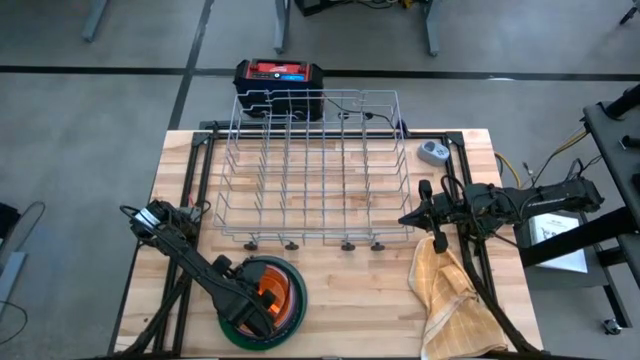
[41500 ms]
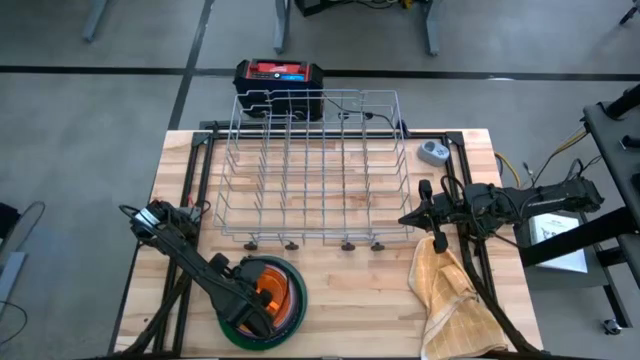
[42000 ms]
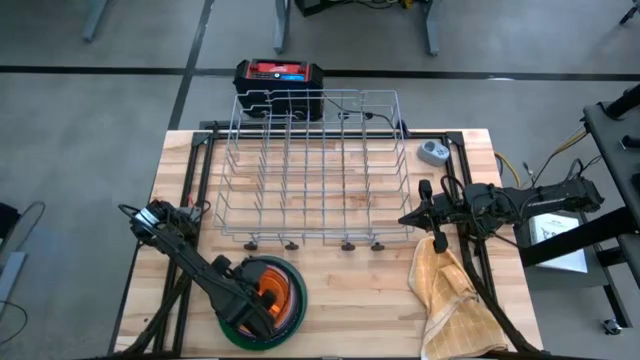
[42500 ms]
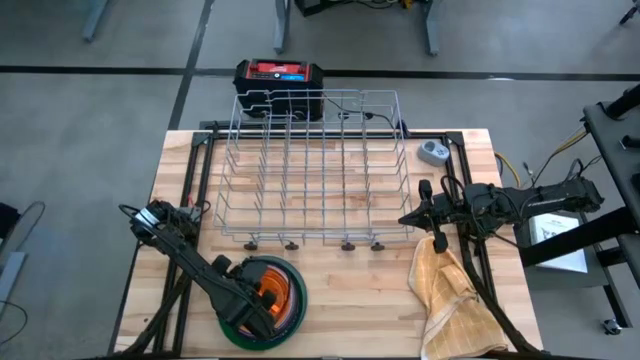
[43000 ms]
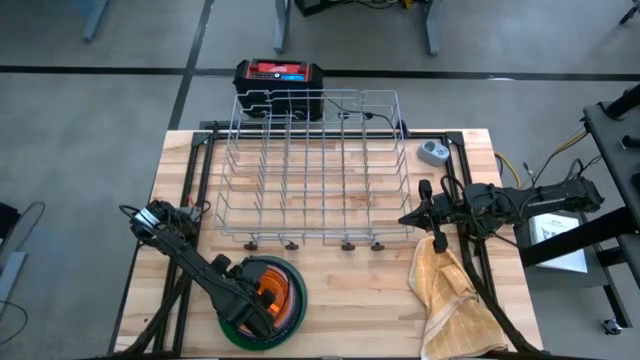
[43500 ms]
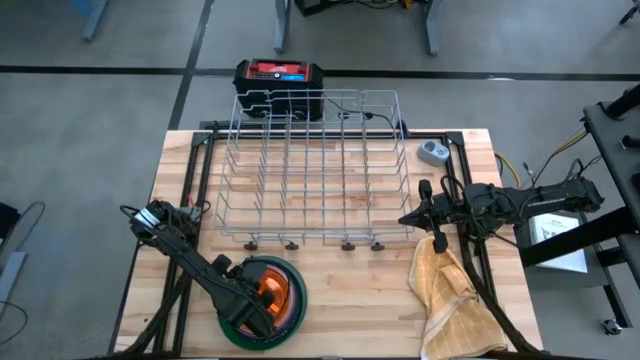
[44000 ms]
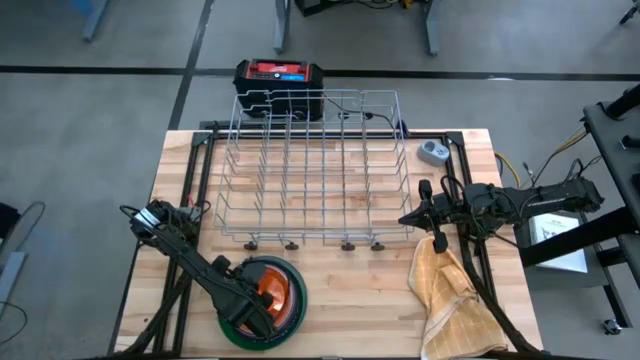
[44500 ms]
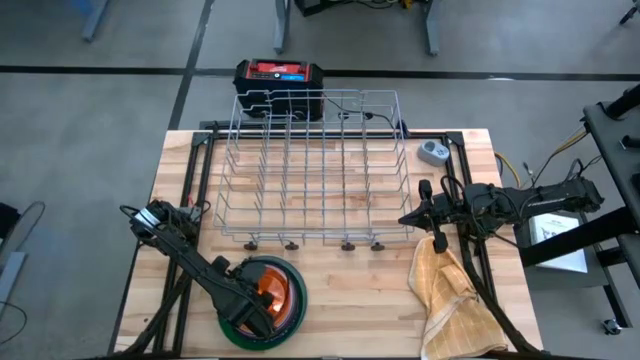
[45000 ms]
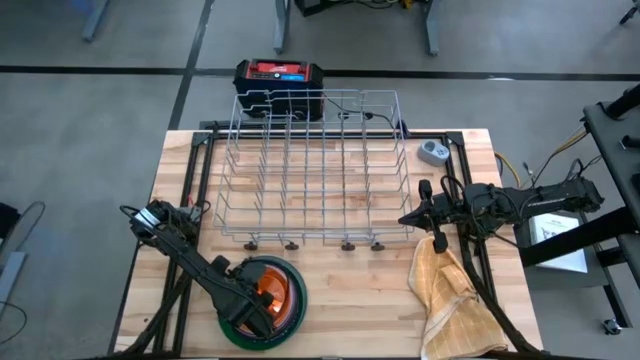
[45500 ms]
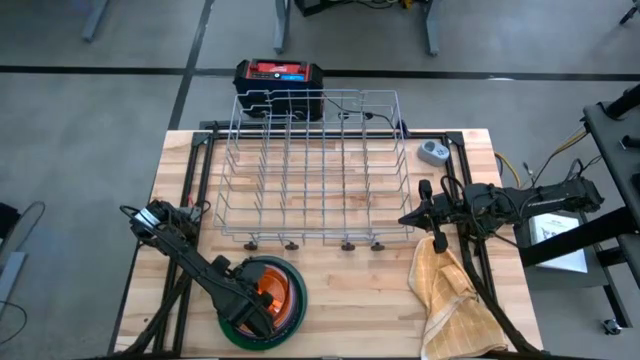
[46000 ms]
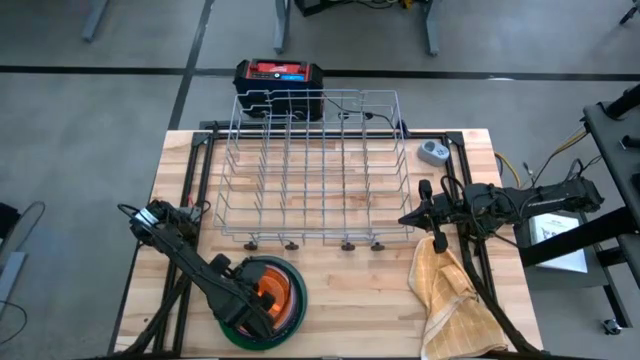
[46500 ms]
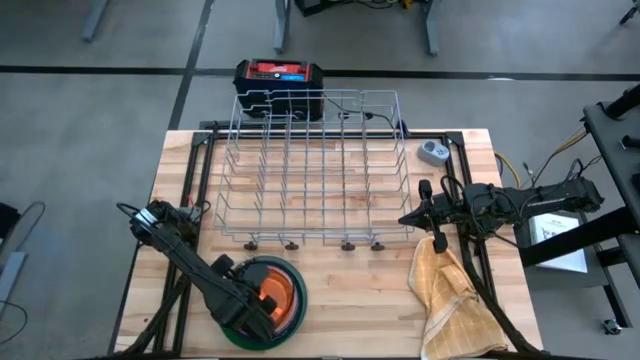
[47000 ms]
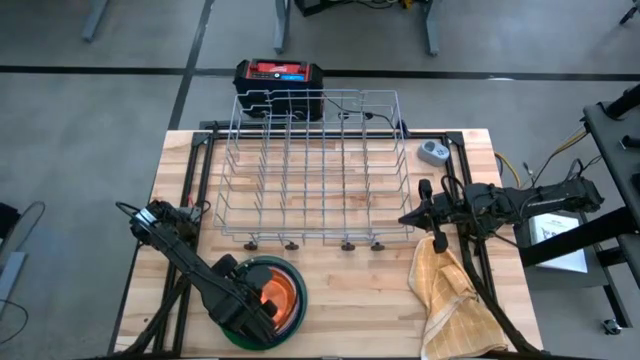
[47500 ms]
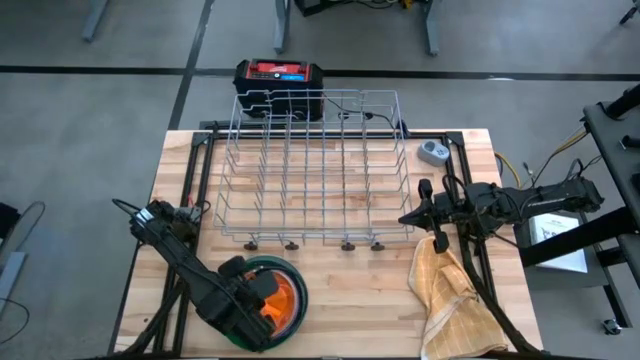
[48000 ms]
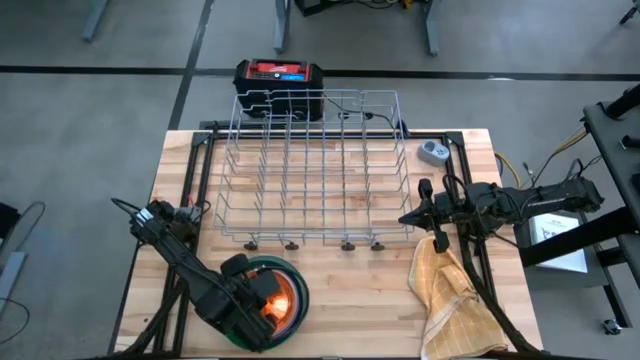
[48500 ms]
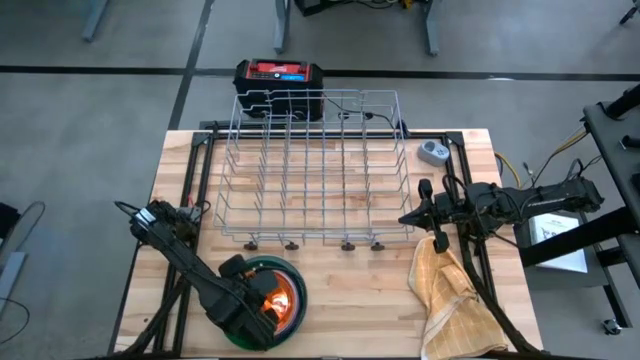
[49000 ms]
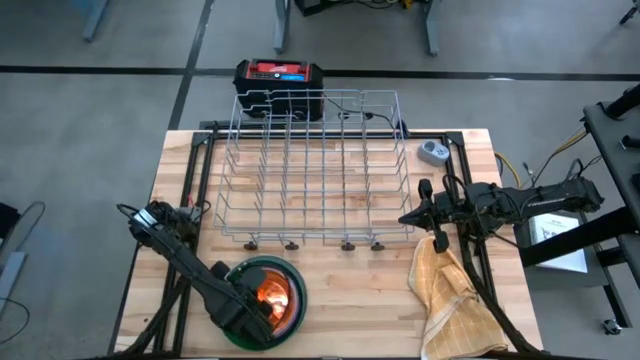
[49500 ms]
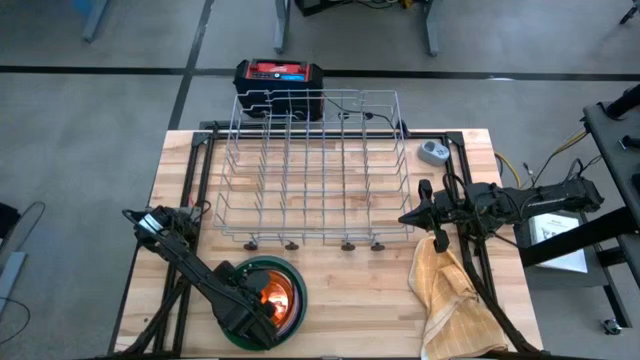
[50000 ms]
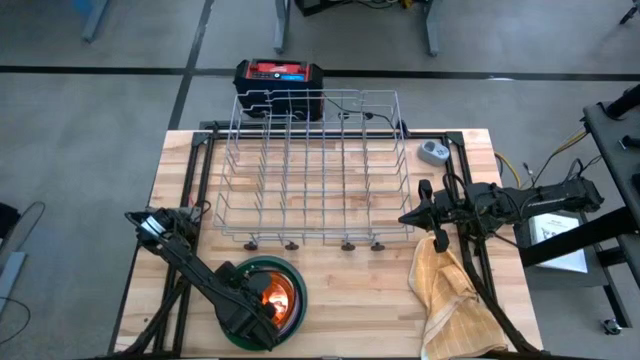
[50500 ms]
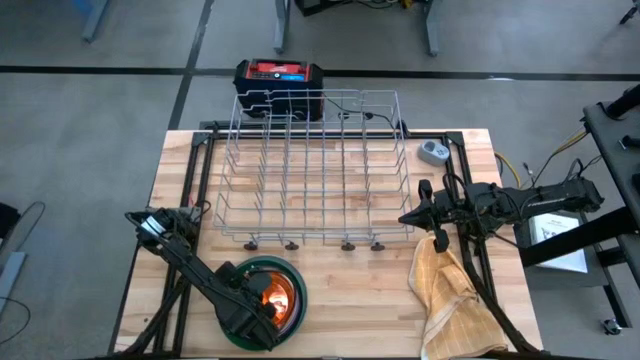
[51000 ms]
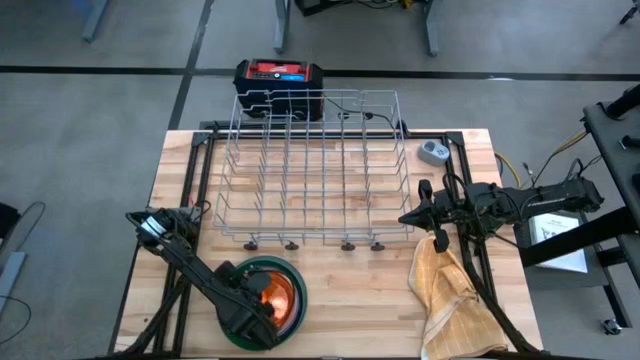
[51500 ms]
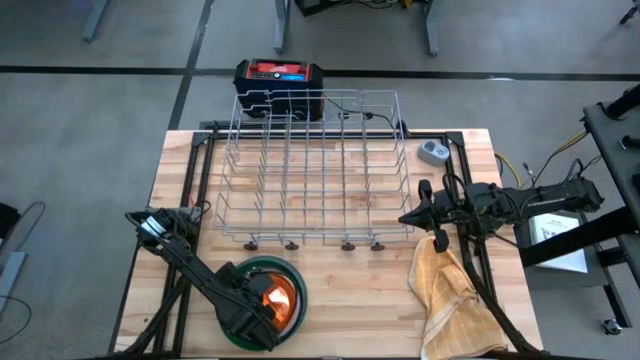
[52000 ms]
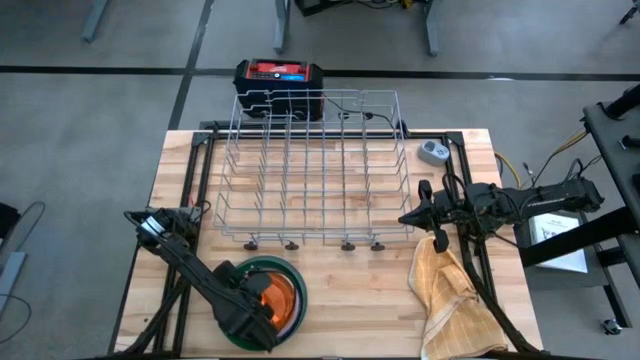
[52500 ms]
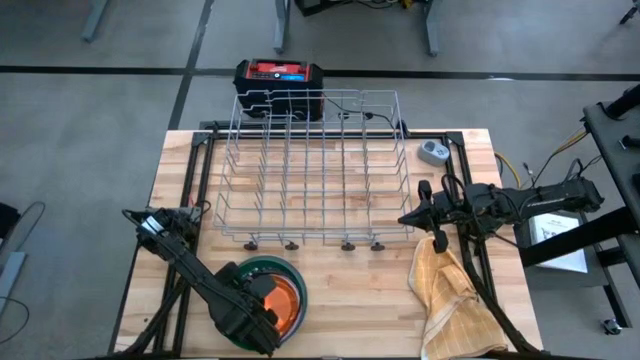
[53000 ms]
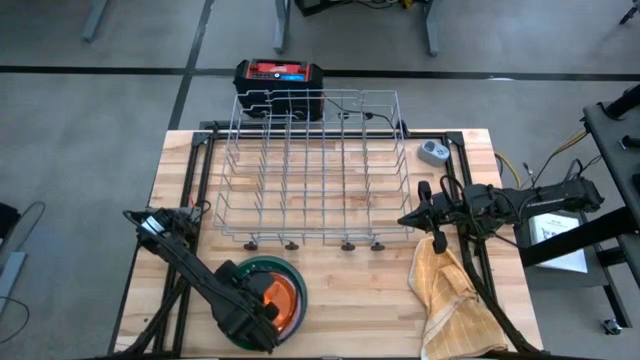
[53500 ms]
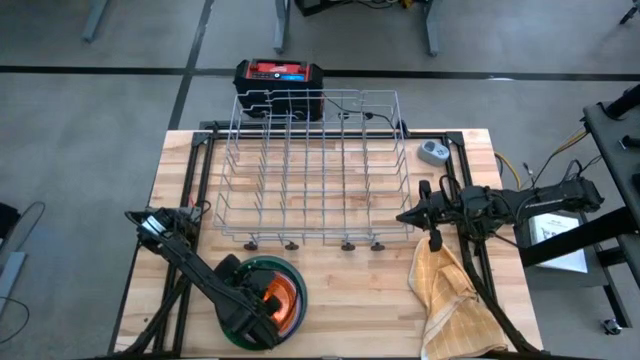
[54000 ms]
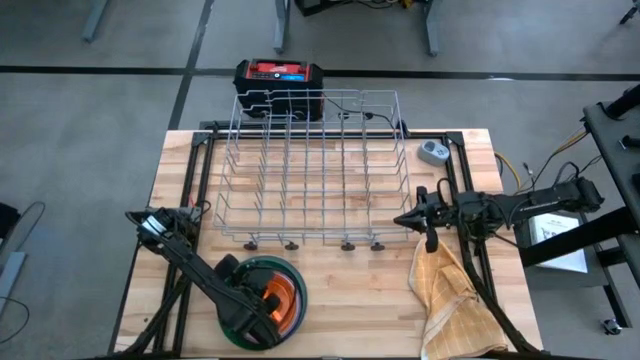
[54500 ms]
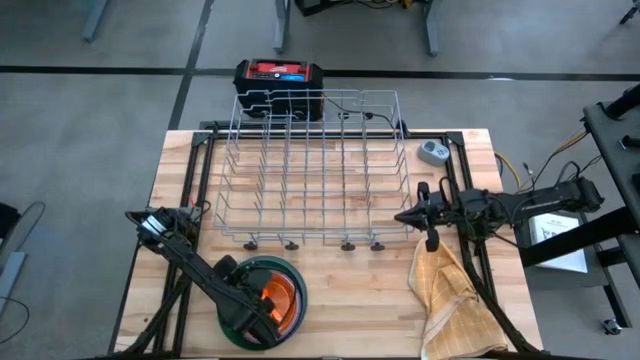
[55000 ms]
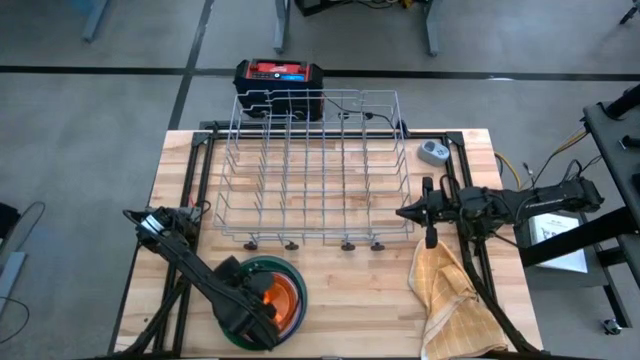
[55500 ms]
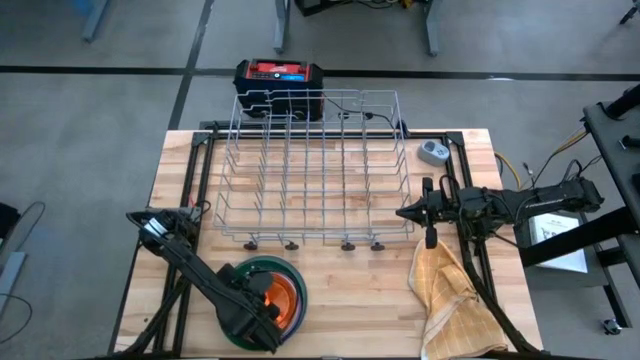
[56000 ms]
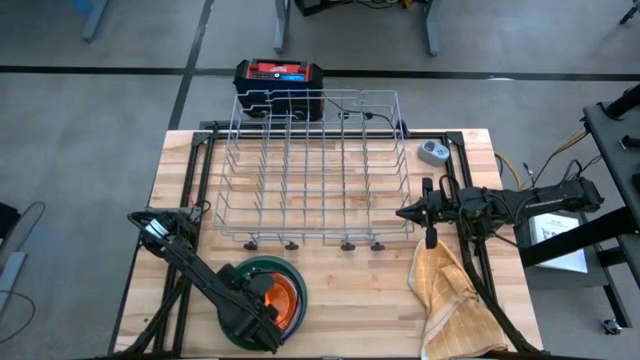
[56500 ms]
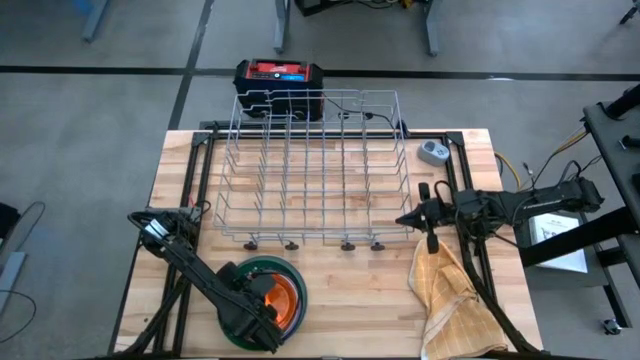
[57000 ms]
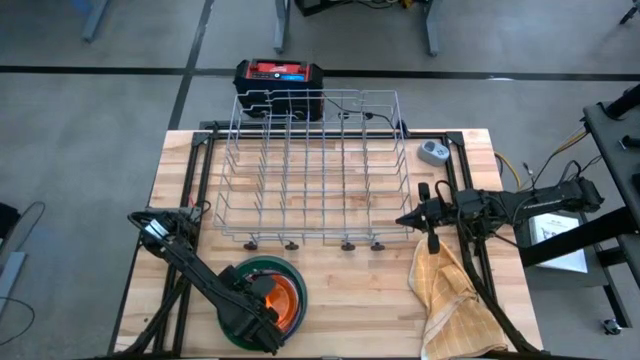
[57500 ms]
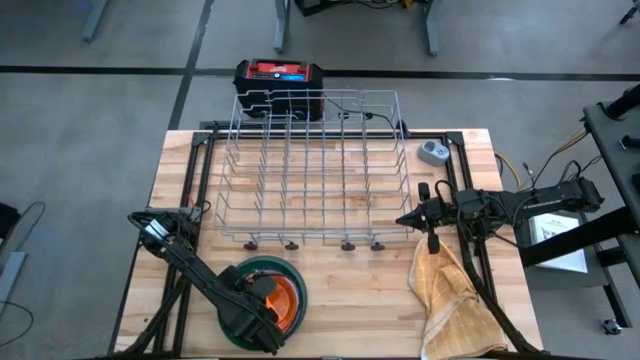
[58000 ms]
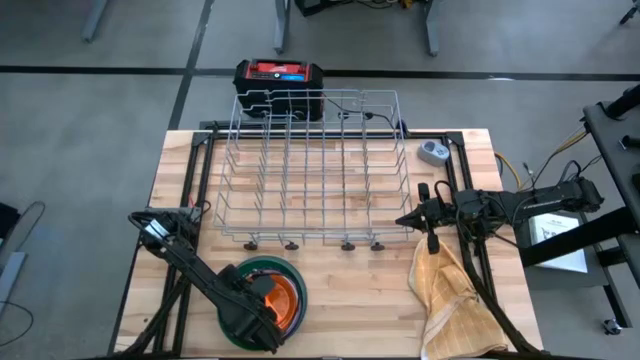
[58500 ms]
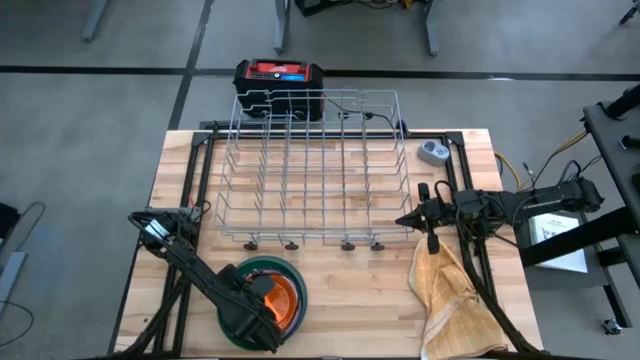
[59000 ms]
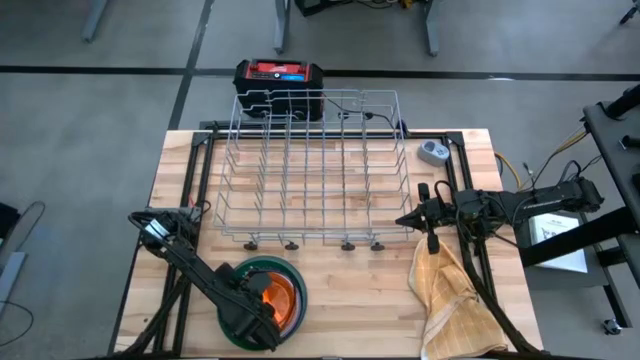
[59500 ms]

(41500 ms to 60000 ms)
Task: Sort dishes
Put the transparent orange plate into the dish rack

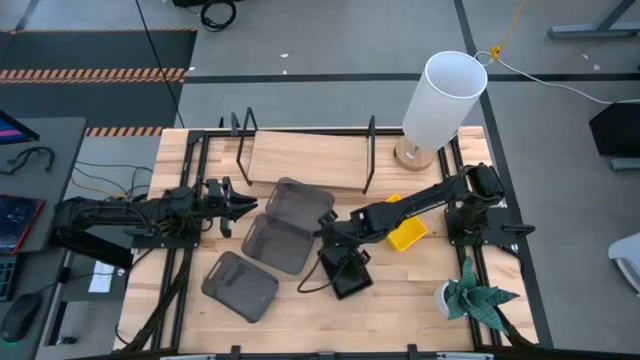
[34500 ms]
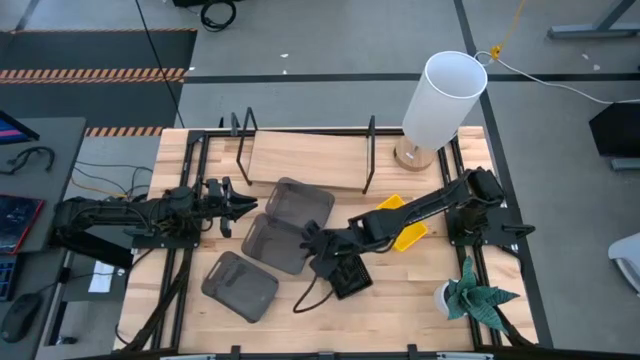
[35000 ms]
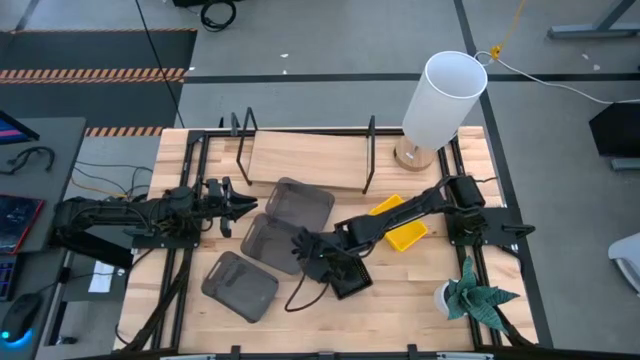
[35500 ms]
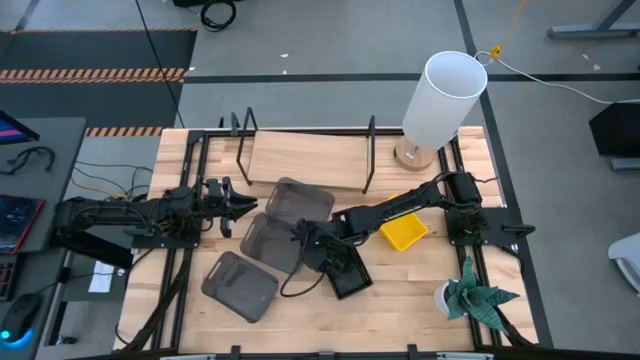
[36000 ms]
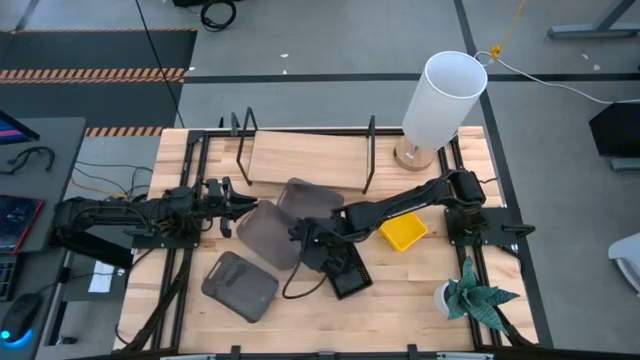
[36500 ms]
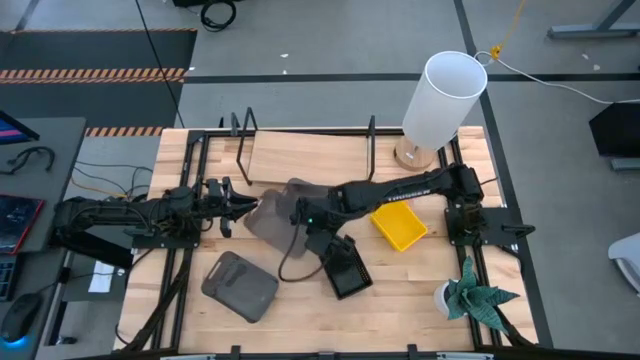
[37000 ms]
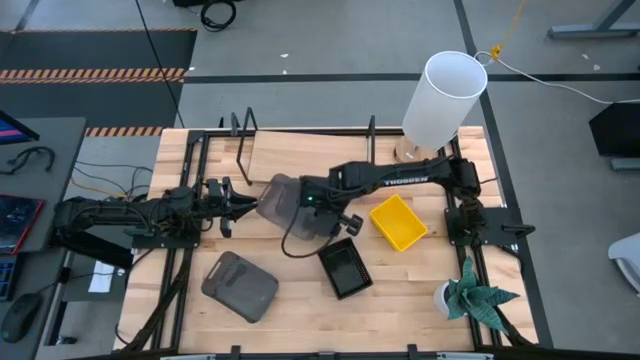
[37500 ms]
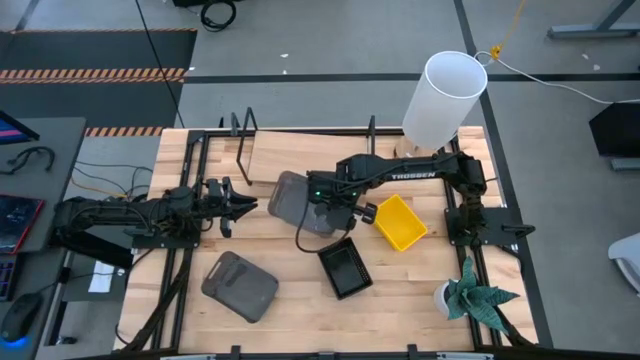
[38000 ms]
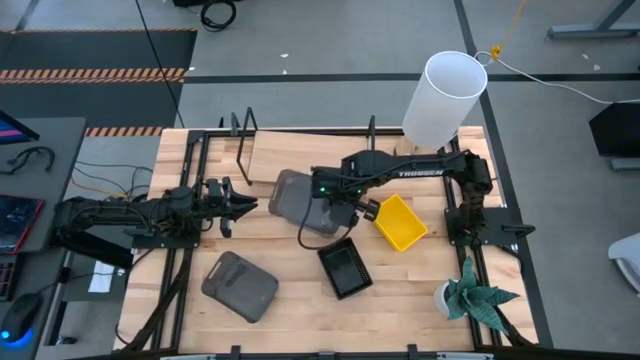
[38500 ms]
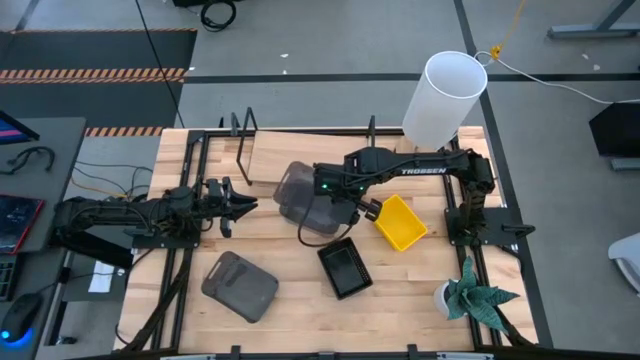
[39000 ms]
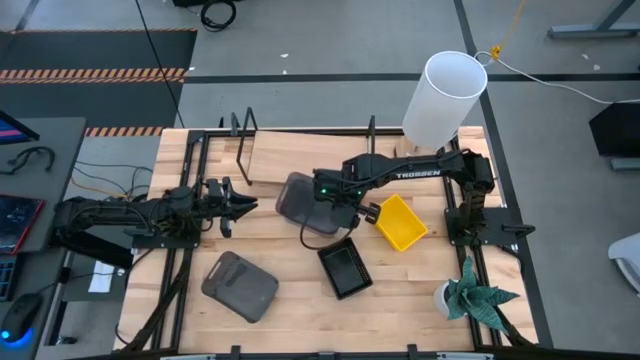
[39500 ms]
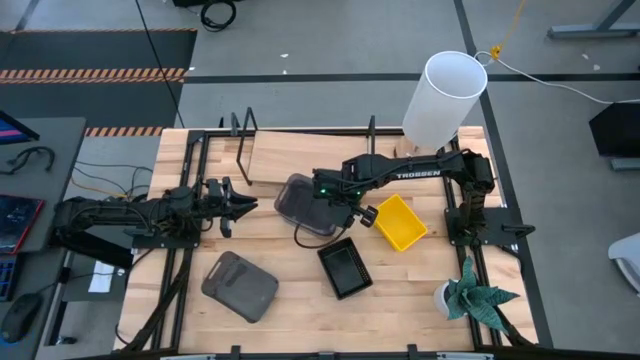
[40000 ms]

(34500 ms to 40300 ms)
Task: Stack baskets on shelf by color
Stack the middle black bin on the top black bin
